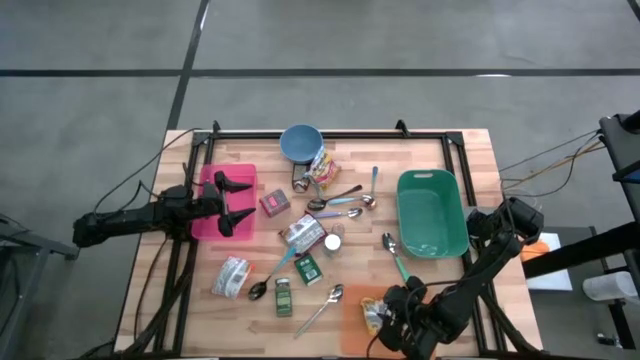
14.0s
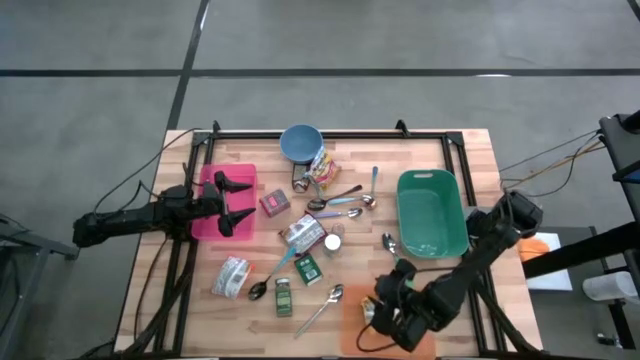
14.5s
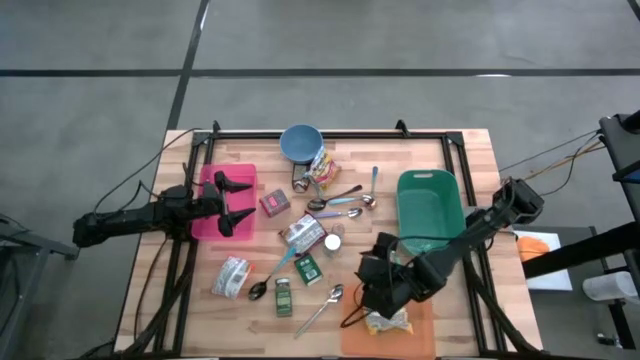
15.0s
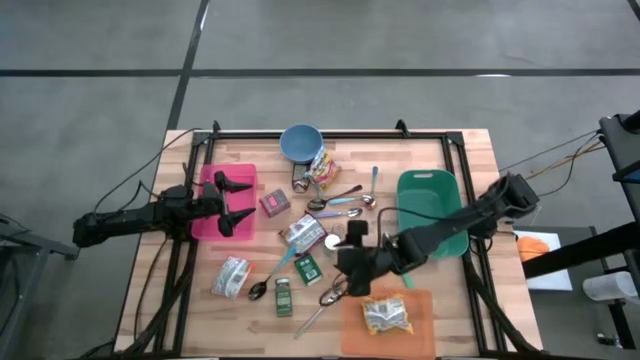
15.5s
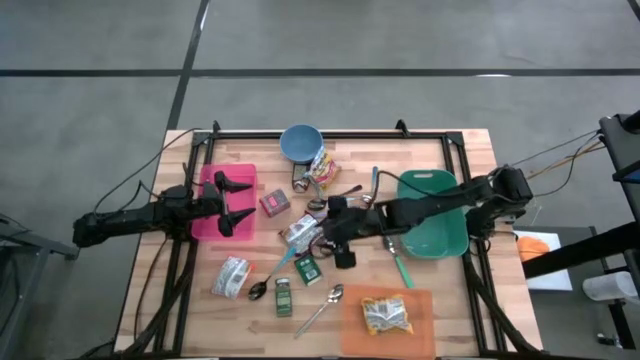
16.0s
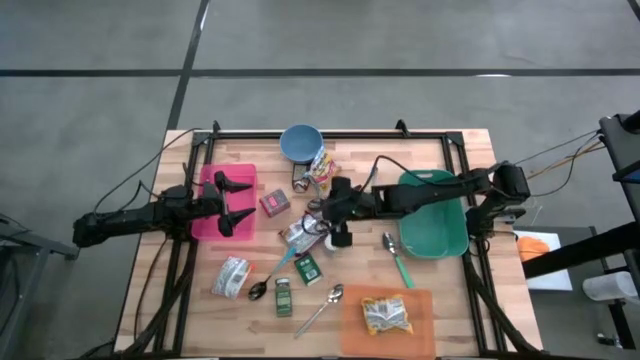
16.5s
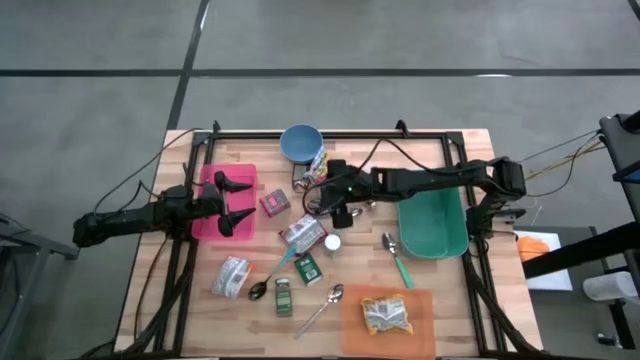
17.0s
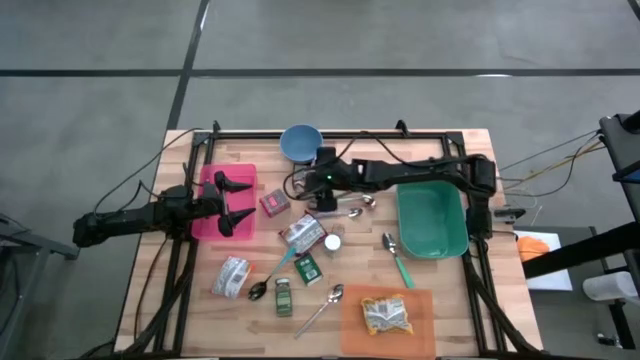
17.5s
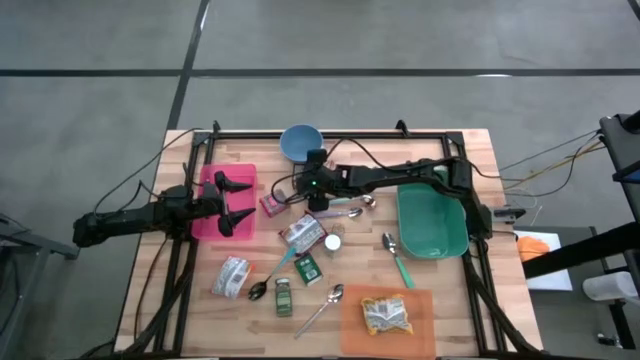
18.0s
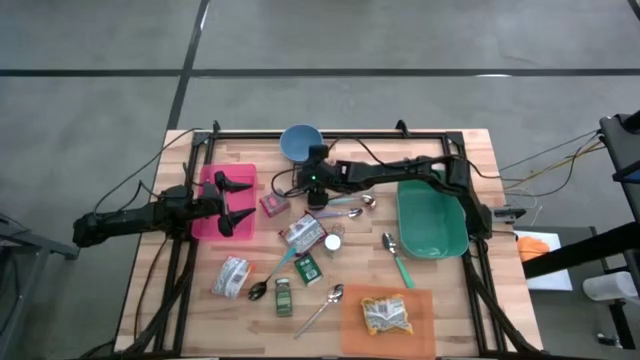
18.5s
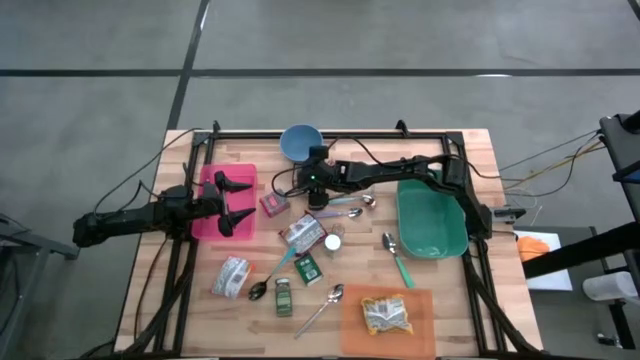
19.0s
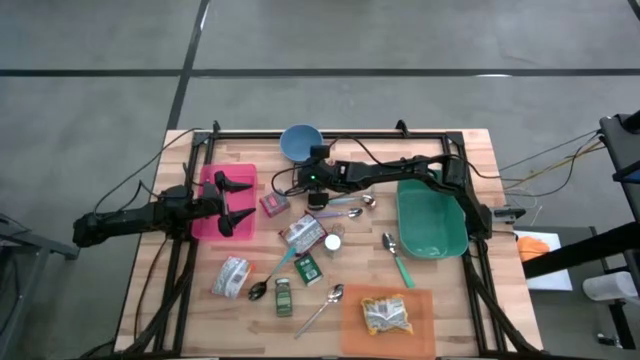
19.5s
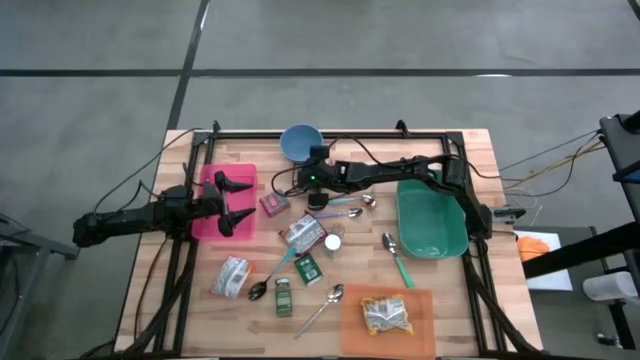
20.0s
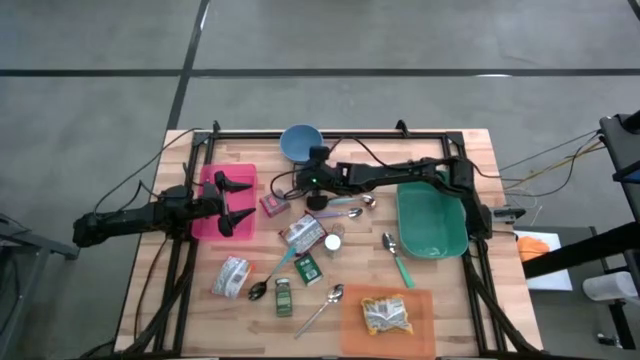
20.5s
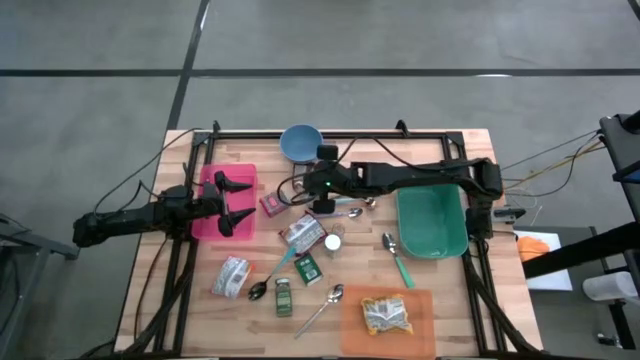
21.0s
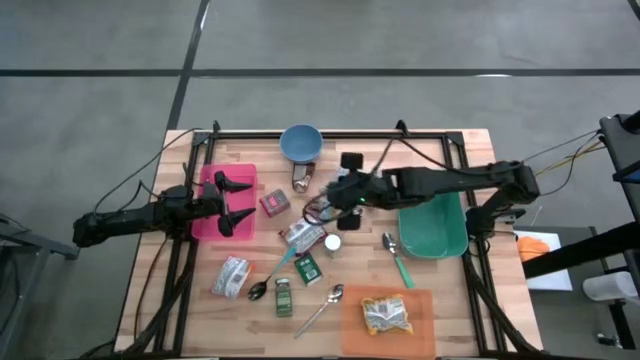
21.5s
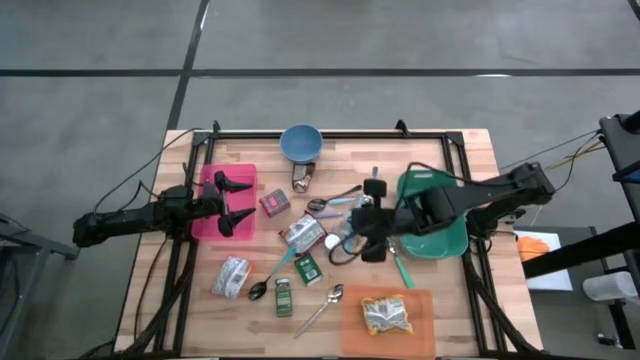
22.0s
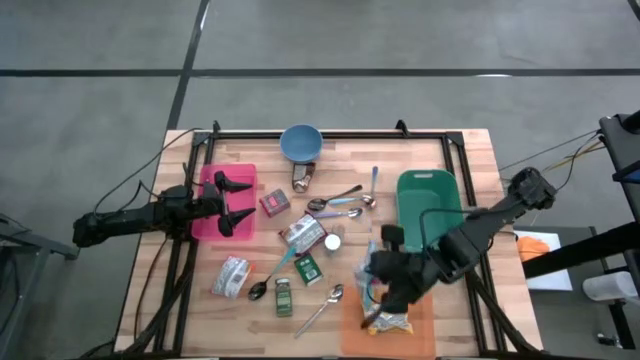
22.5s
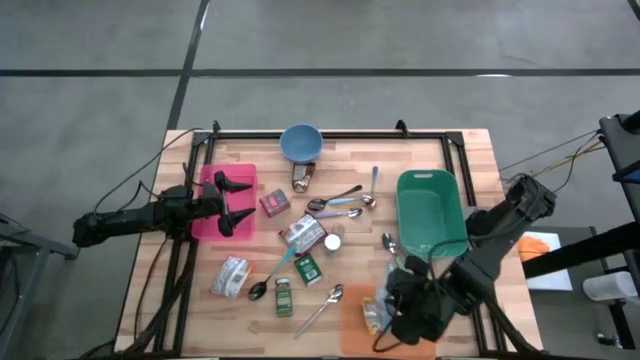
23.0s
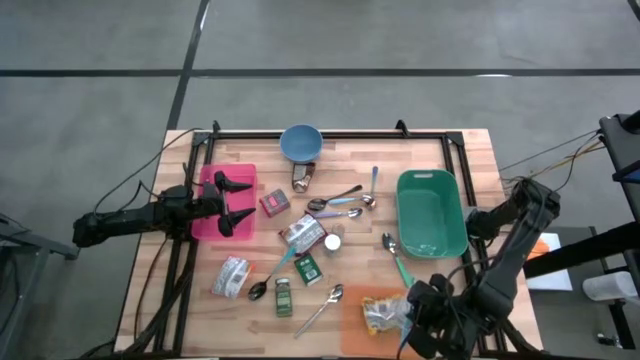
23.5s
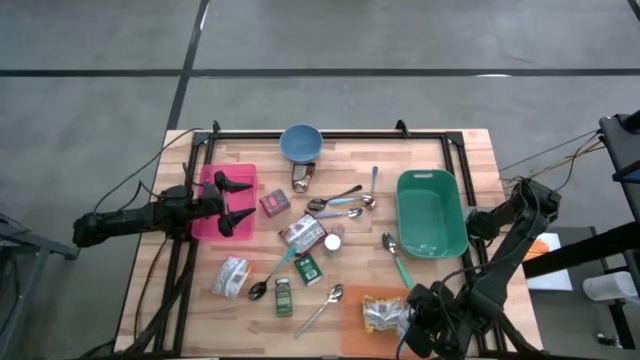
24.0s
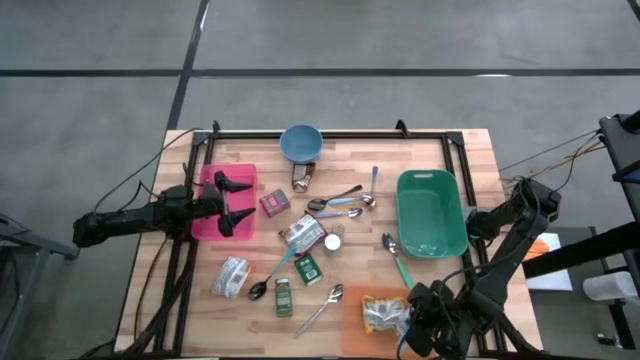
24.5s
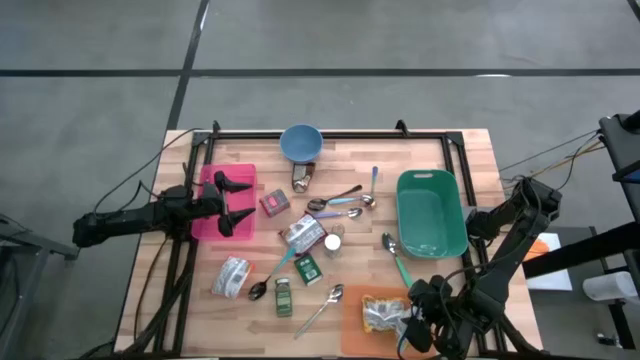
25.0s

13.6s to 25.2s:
Put the blue noodle pack into the orange bin

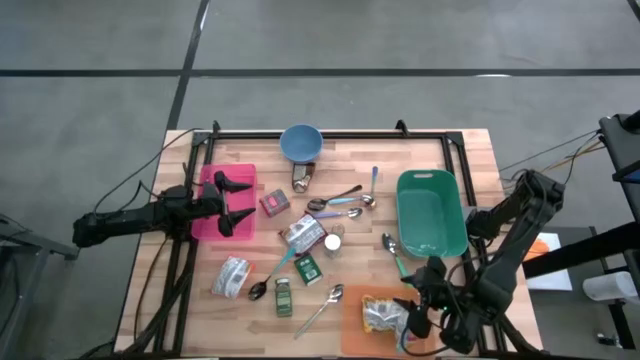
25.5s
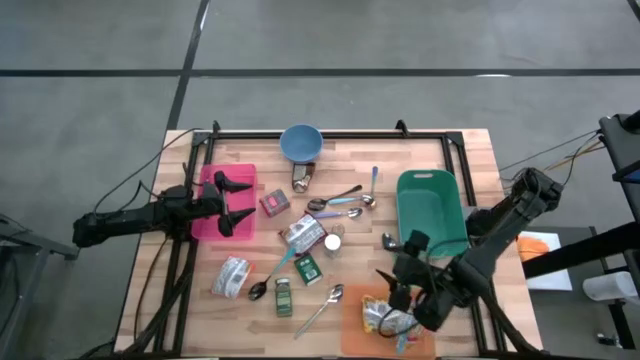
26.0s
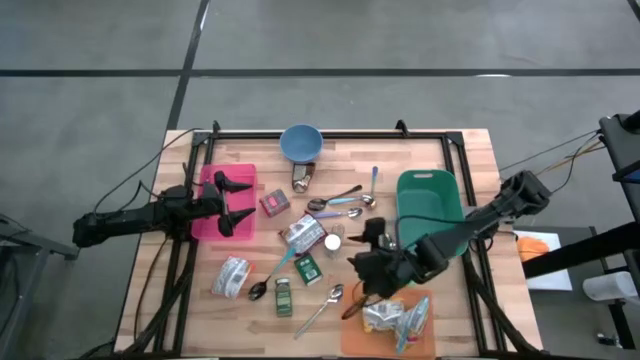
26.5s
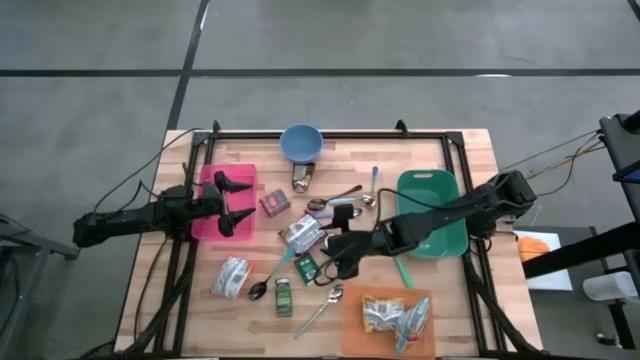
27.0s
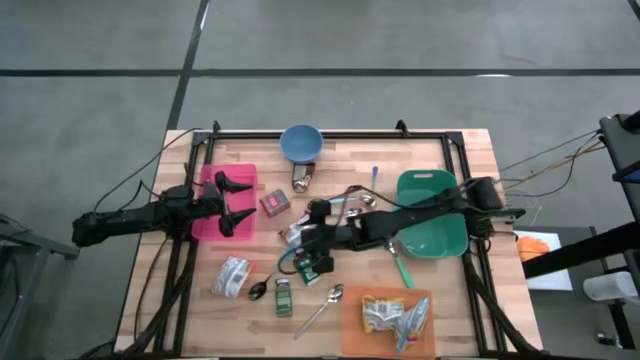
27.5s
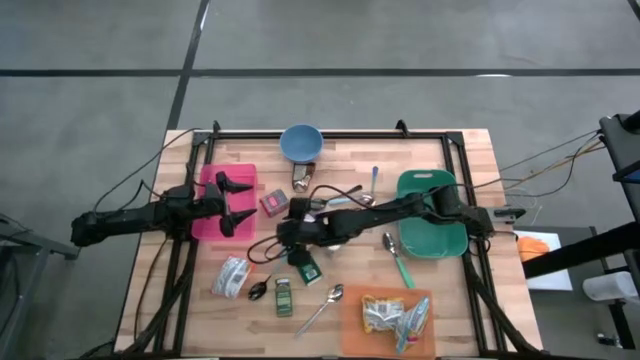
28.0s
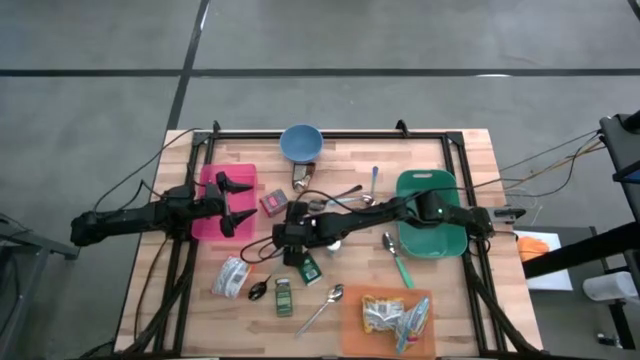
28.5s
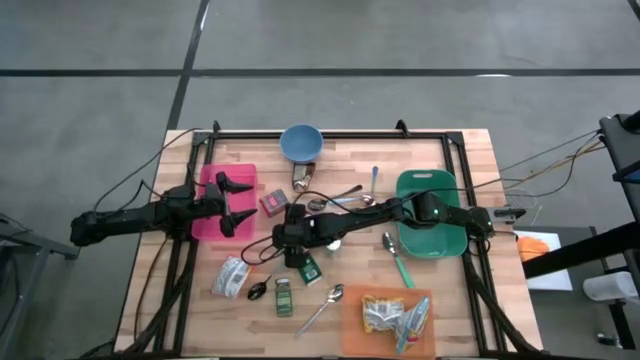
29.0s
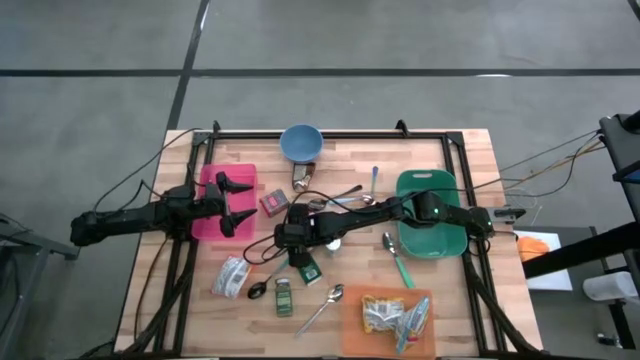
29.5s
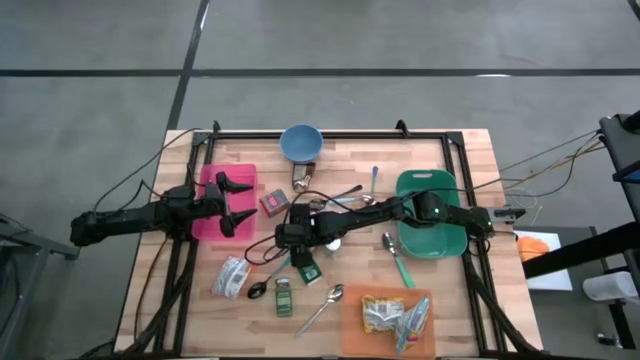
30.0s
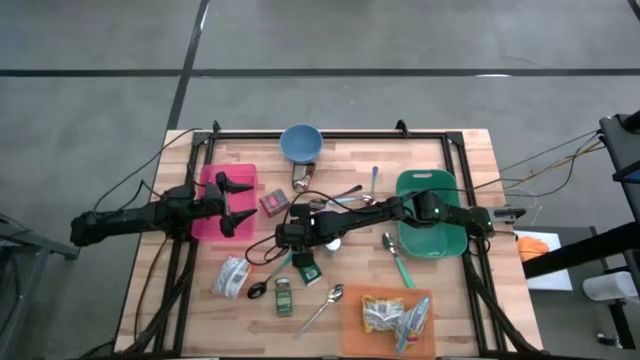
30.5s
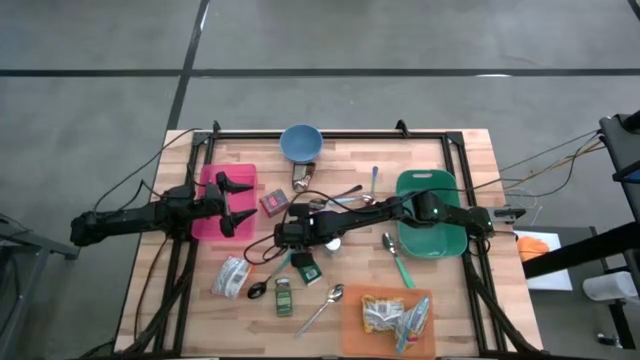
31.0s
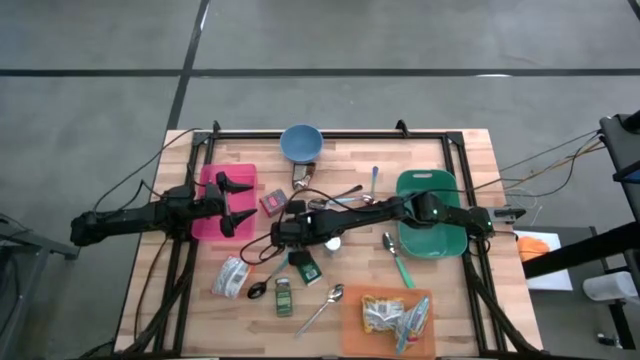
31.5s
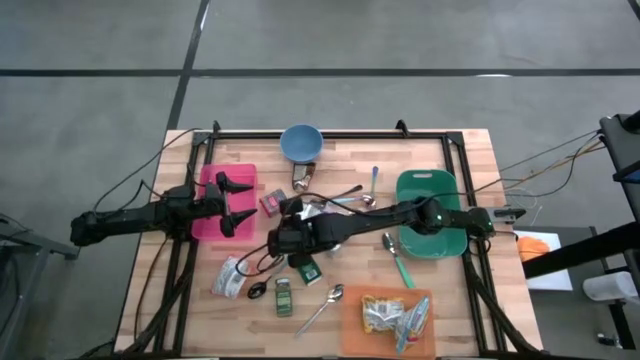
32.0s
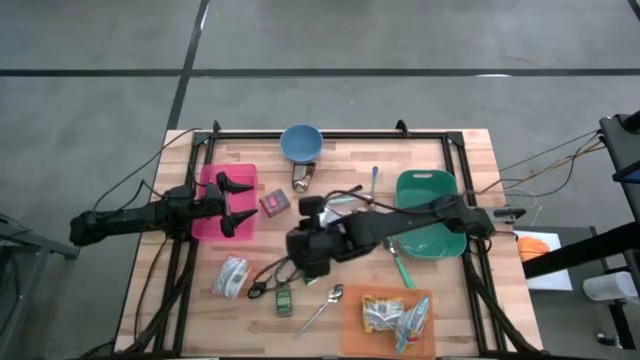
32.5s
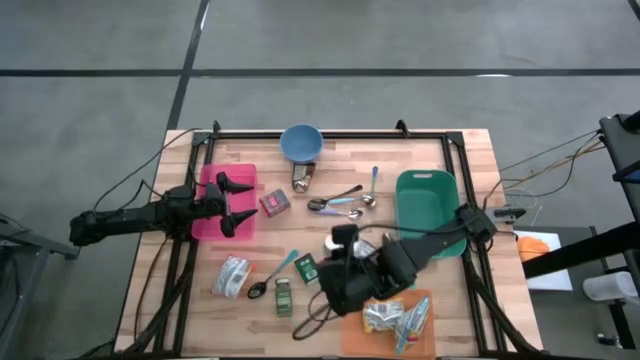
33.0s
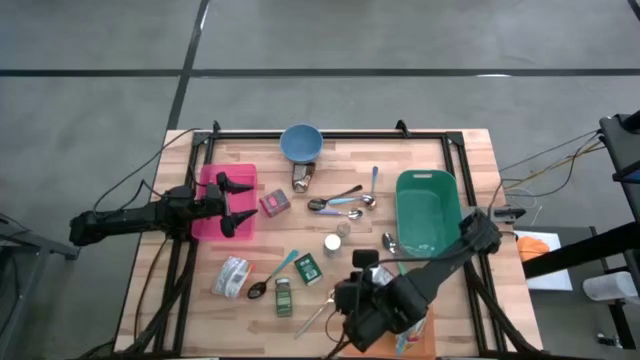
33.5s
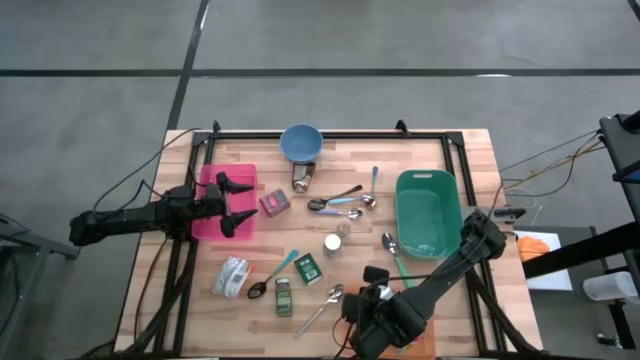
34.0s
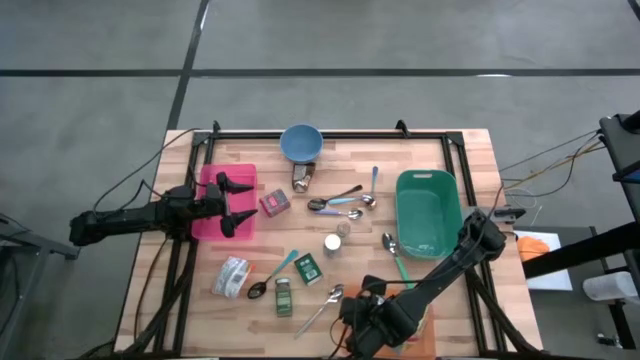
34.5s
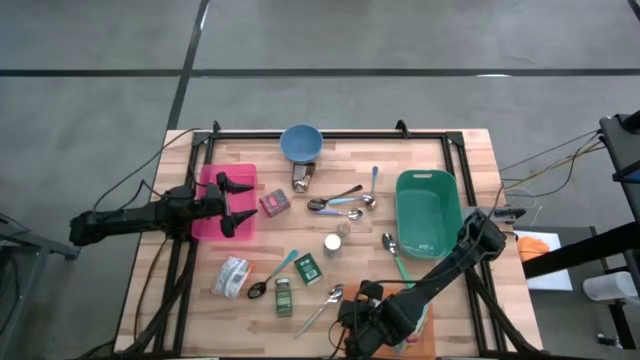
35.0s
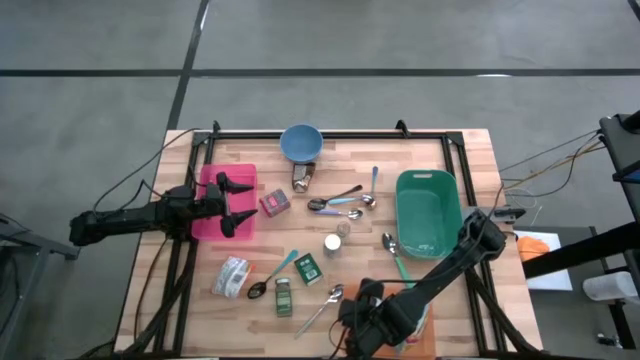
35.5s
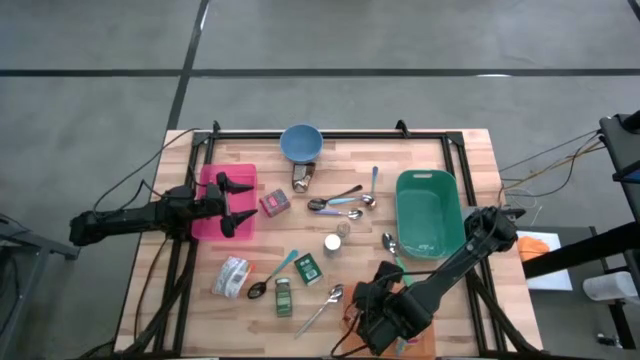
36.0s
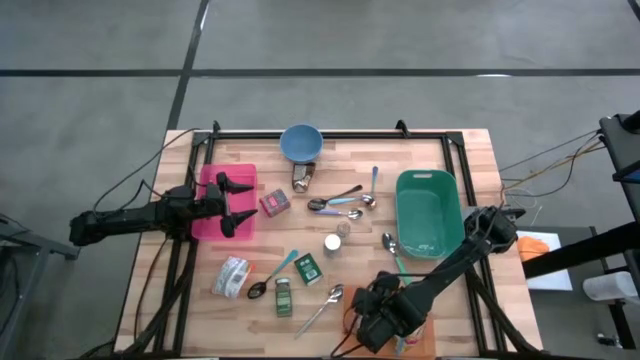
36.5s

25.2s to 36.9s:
Put the red noodle pack into the orange bin
